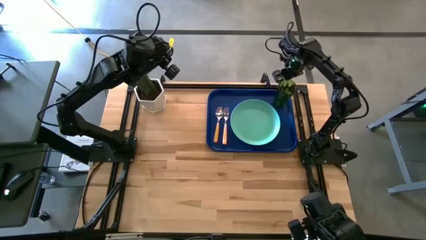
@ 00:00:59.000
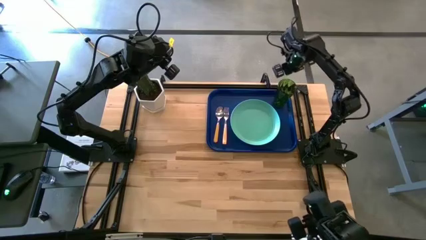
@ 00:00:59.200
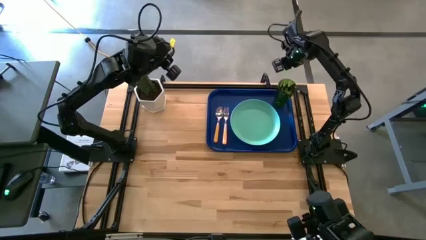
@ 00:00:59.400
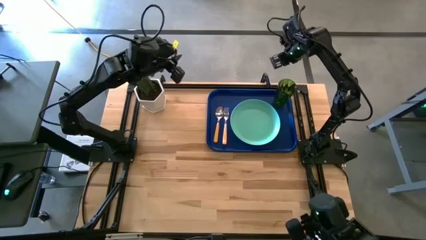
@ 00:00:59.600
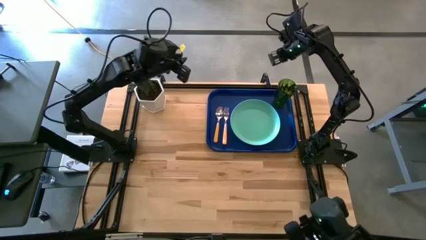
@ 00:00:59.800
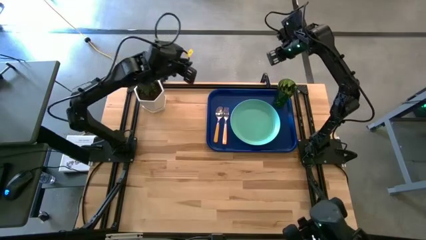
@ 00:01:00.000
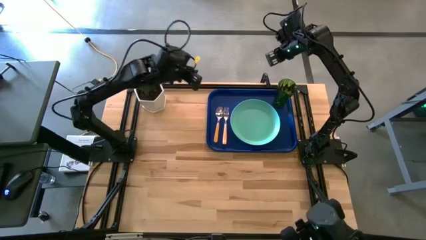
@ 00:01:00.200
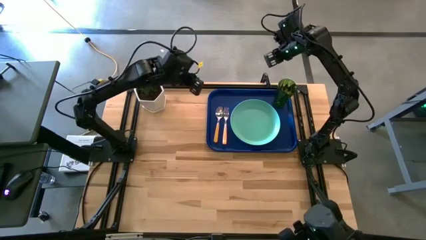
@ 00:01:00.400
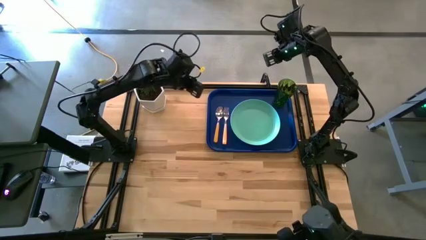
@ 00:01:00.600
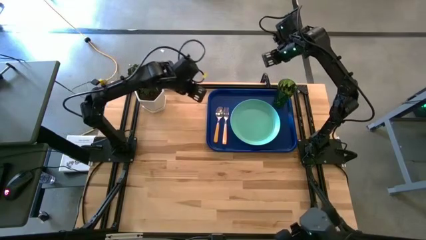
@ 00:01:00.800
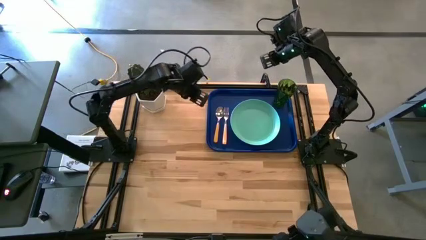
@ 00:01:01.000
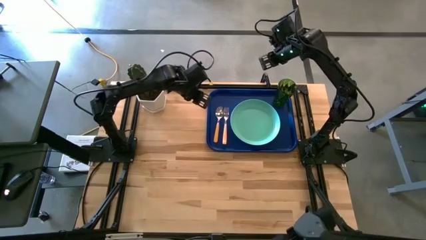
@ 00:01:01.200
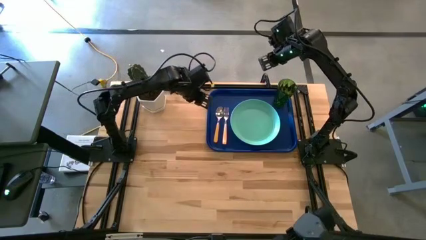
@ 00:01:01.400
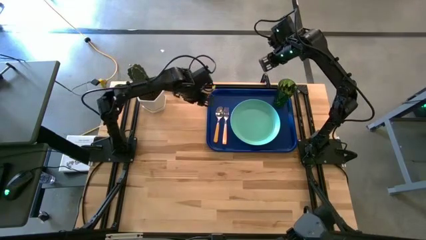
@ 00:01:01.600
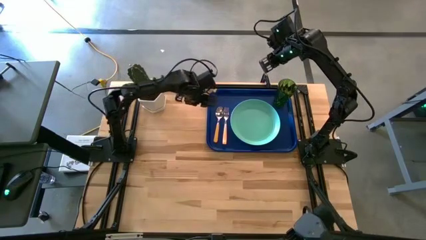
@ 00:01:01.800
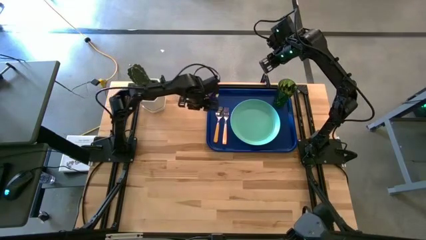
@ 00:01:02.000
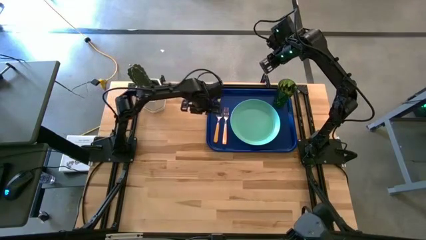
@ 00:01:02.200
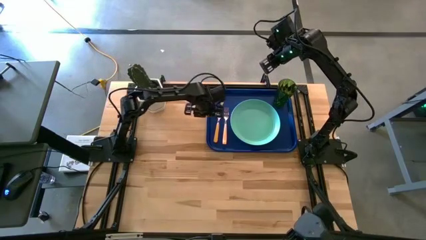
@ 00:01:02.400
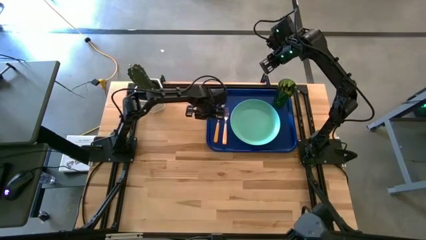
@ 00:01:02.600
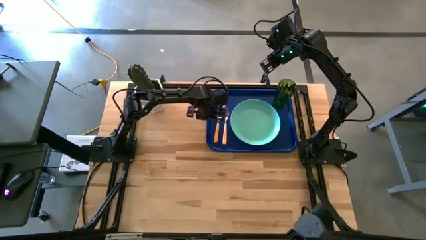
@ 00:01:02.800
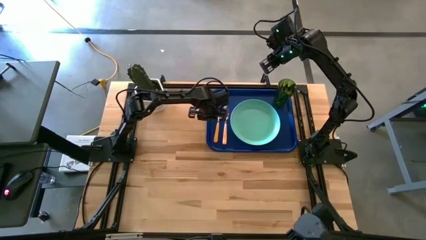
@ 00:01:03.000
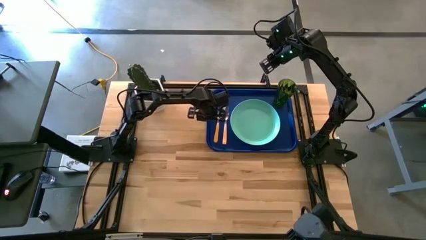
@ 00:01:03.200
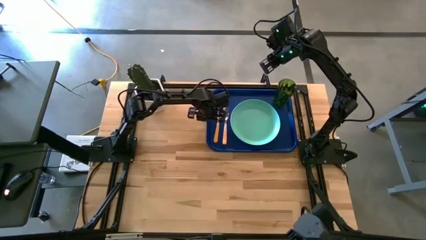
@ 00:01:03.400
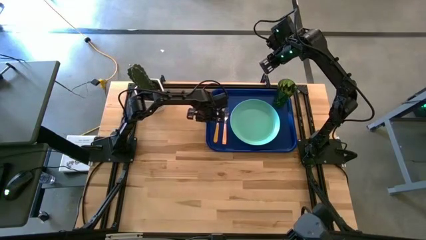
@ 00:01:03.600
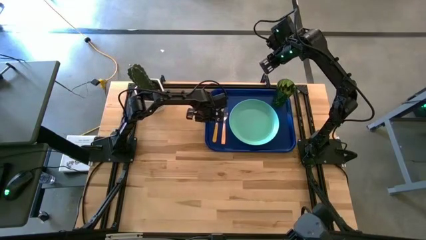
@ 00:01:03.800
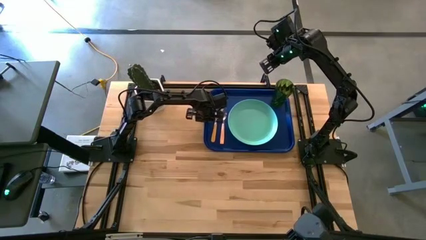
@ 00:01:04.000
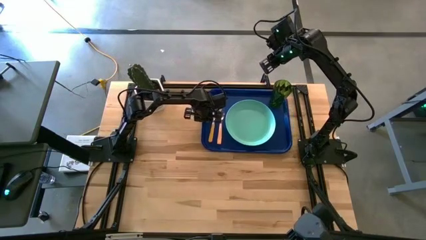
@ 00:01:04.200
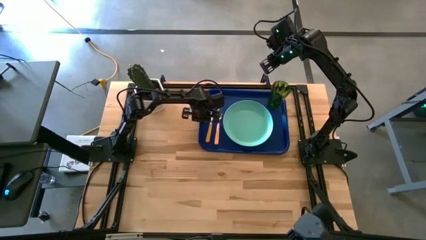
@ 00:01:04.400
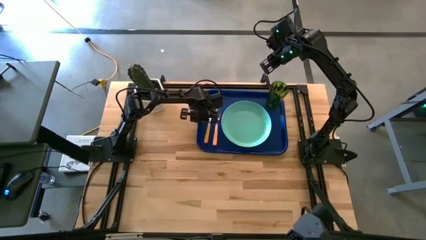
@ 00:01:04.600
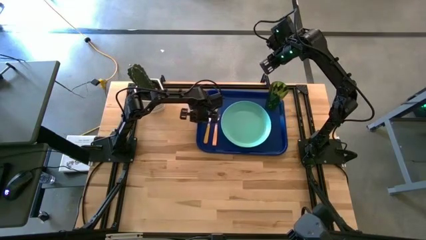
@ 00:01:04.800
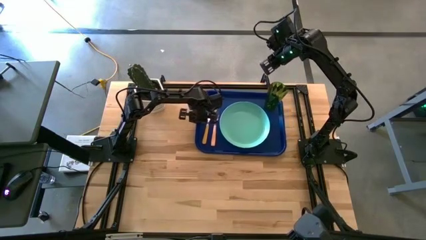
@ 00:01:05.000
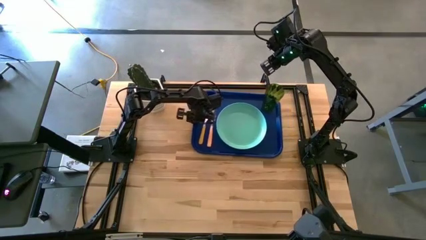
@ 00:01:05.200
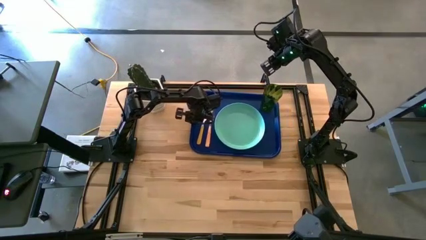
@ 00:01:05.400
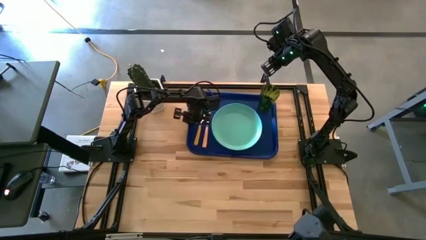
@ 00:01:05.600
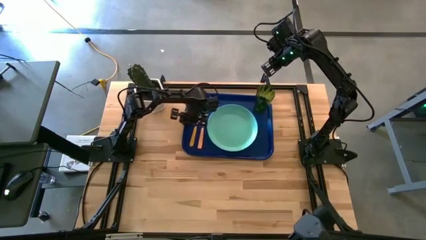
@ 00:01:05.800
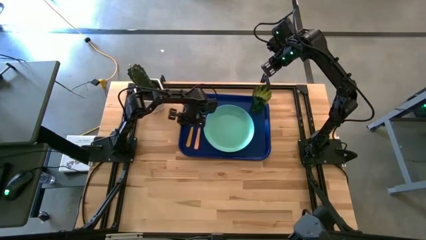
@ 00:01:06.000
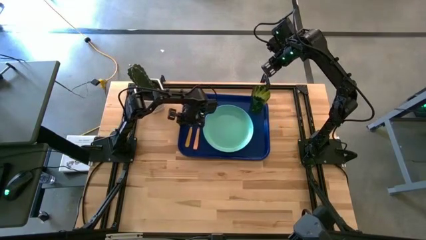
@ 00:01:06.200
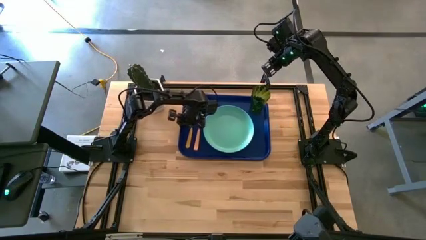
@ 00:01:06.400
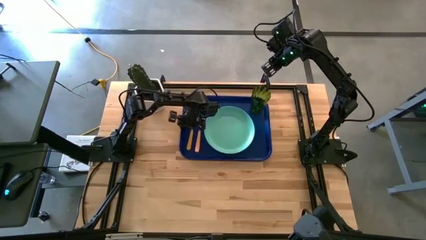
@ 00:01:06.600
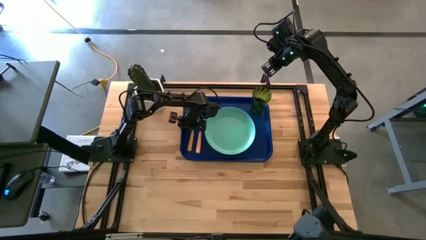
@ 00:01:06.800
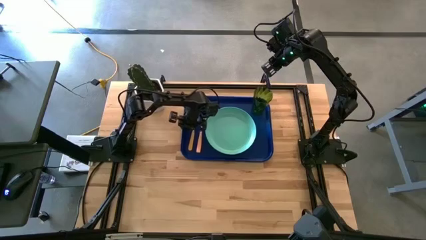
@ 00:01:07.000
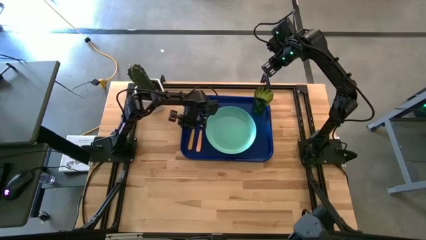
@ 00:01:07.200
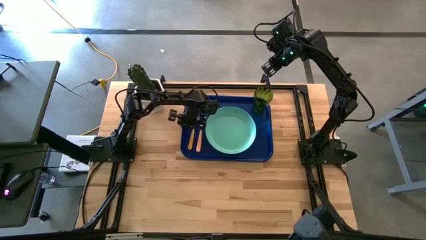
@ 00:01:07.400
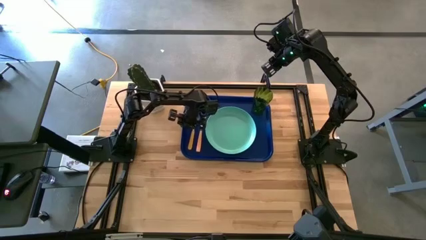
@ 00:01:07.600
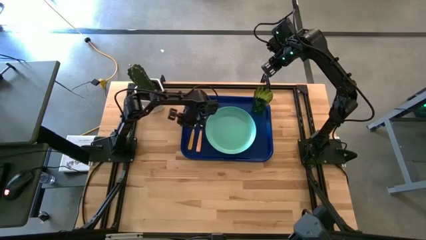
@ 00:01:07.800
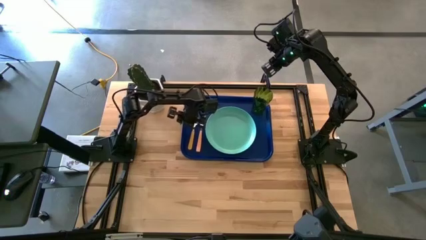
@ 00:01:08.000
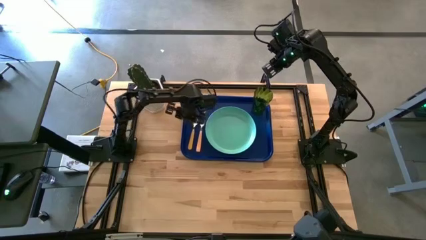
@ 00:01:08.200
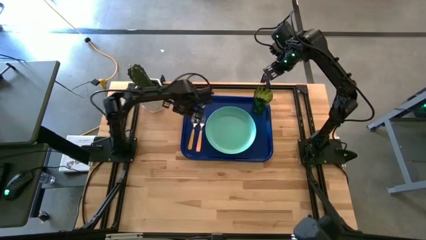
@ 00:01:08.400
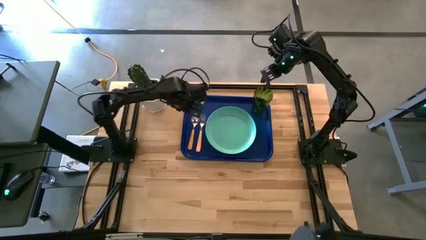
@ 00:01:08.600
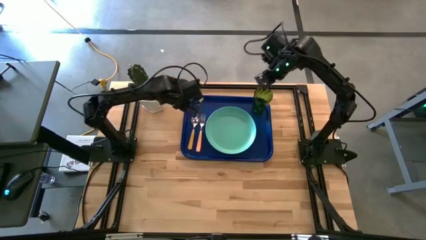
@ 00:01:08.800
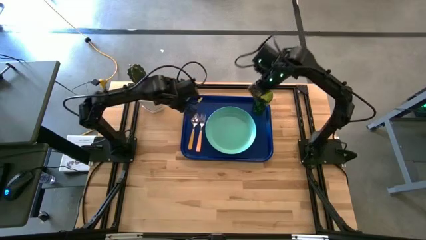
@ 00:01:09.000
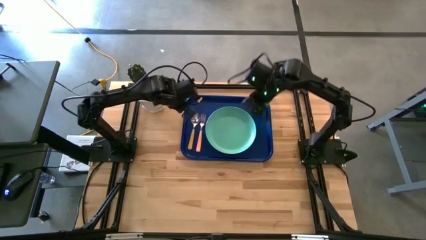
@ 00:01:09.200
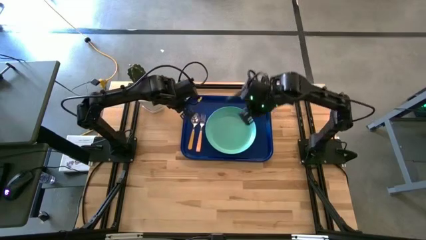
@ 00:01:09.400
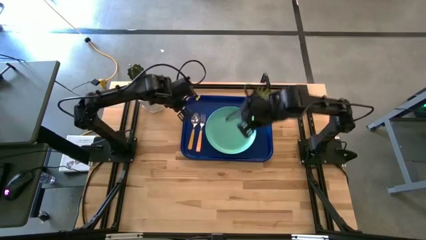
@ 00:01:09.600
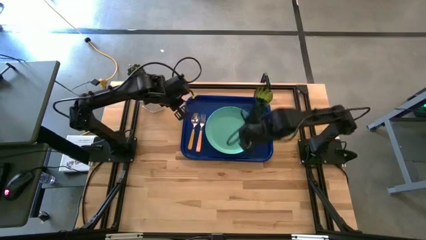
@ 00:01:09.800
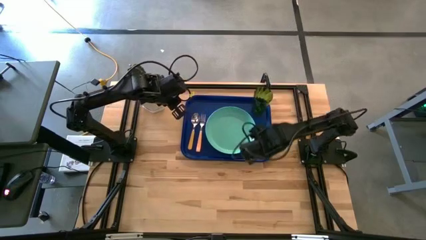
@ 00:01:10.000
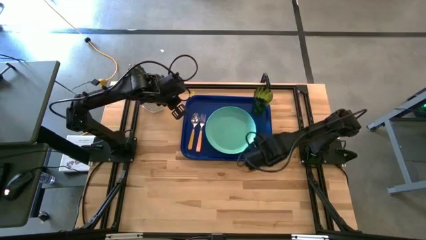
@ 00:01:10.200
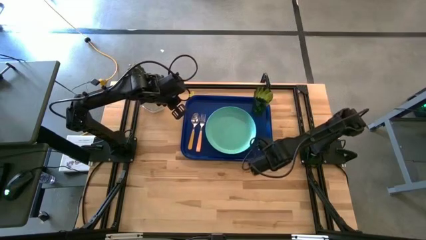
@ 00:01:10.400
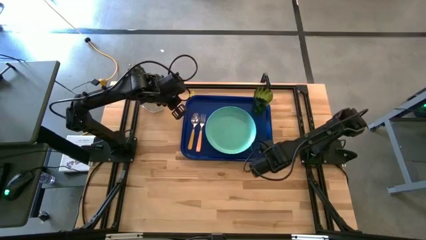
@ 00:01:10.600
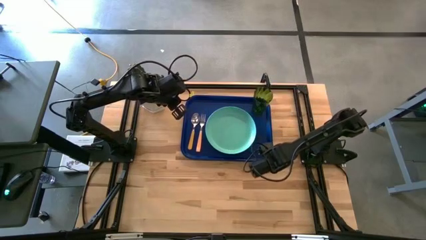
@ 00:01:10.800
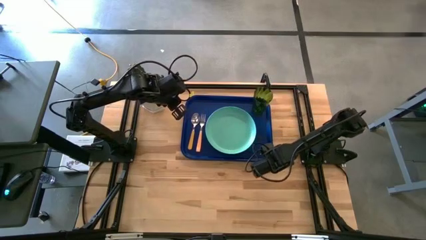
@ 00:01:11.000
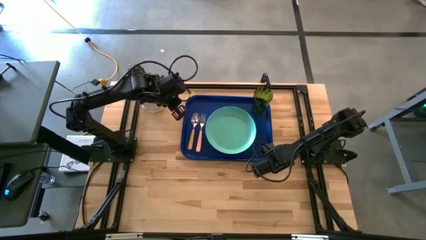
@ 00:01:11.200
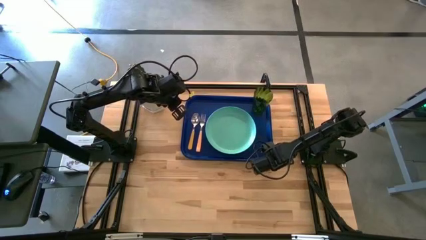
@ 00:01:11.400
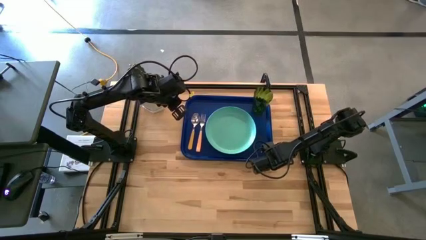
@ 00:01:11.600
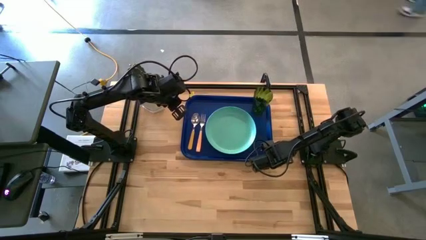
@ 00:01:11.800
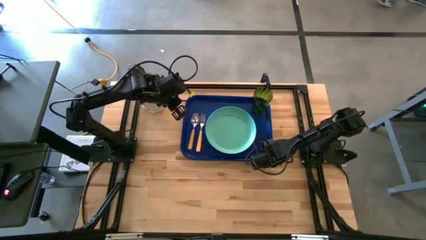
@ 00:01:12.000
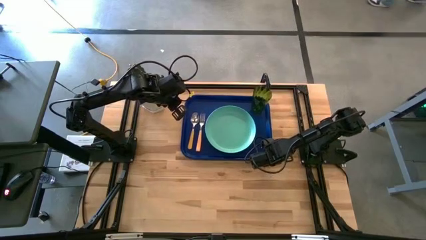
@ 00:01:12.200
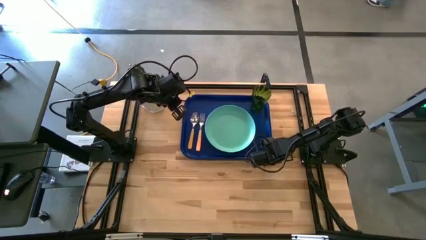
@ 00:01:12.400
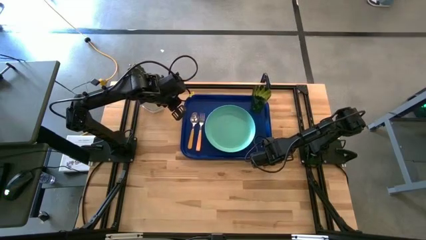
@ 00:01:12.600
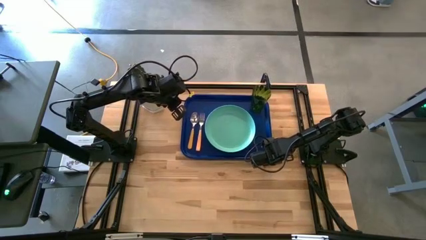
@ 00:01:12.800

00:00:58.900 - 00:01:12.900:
Task: Pick and place plate/cup/fork/spoon on tray
Adjust the blue tray

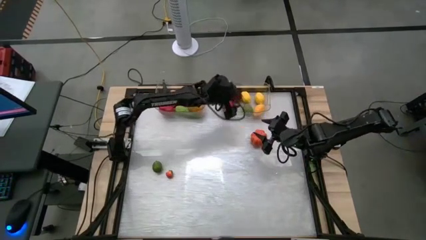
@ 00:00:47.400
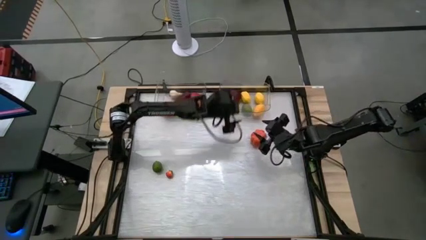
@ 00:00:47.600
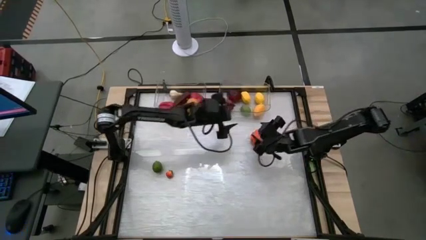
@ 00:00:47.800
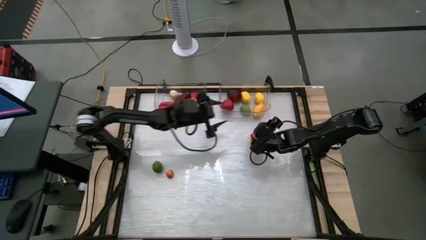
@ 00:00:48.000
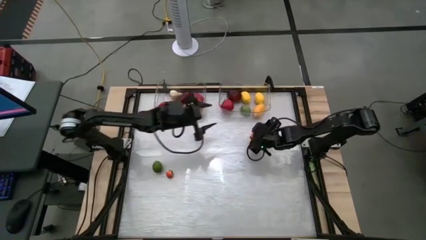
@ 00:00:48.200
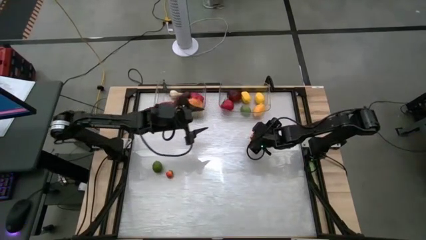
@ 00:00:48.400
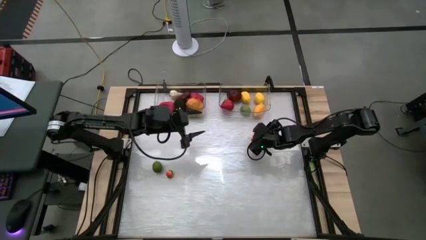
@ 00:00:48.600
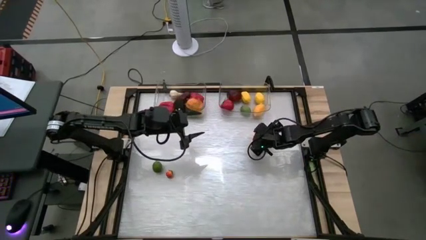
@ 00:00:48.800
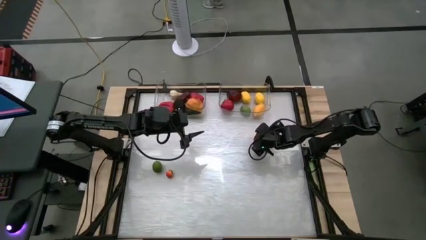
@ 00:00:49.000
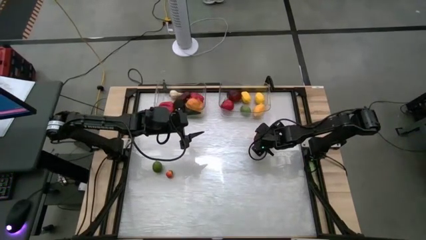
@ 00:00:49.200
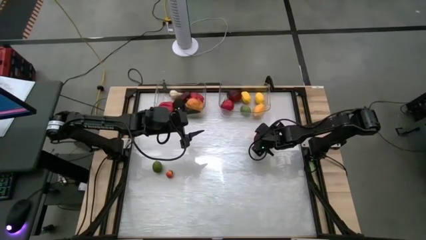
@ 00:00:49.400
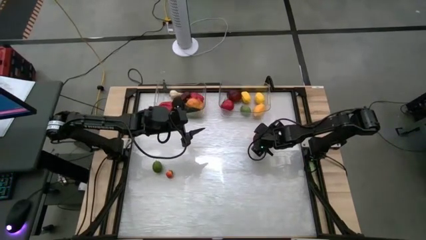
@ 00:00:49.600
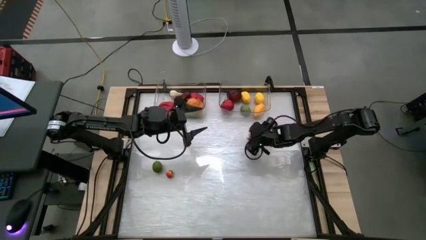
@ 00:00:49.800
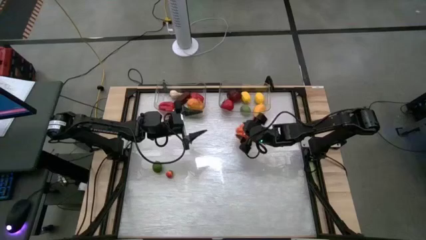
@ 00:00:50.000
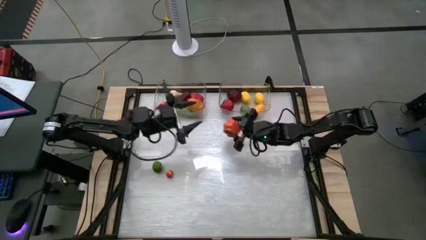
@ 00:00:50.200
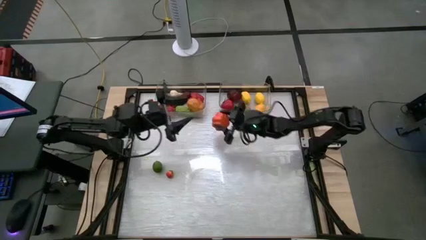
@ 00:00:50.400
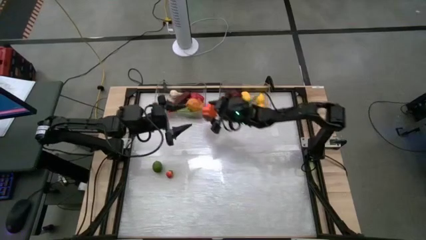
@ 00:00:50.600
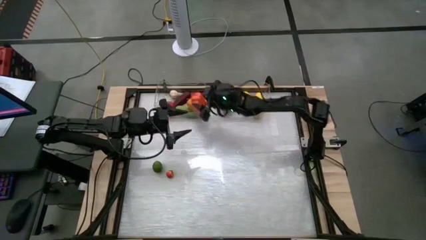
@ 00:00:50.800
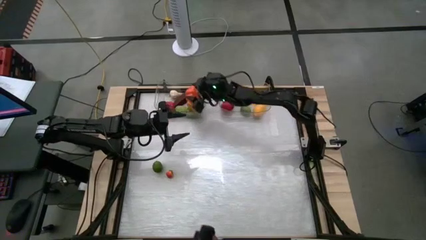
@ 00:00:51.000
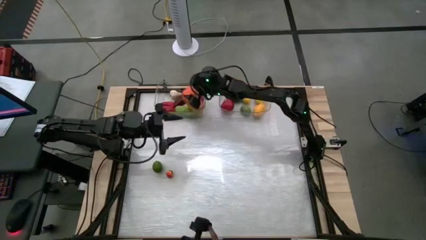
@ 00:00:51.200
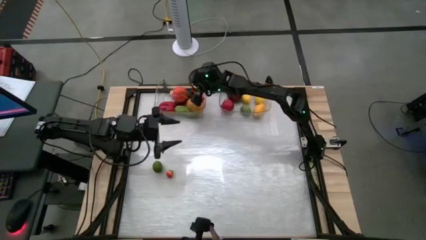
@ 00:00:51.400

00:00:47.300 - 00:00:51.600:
Task: Sort produce into baskets
Put the squash in the container
